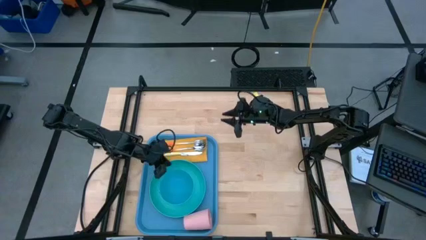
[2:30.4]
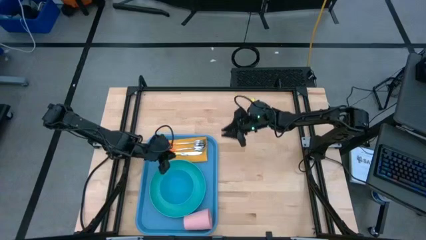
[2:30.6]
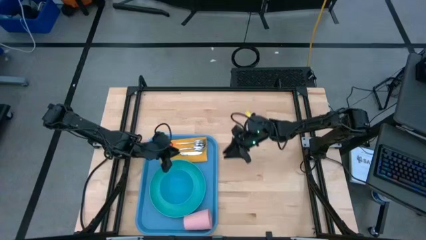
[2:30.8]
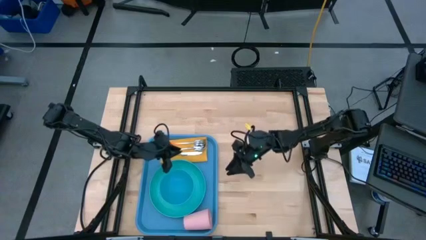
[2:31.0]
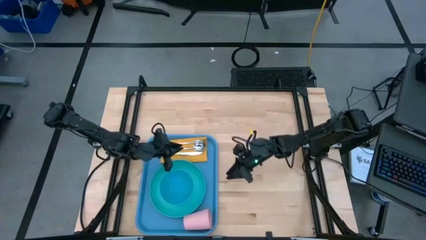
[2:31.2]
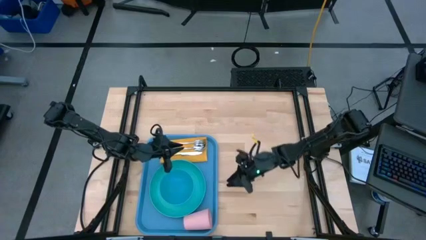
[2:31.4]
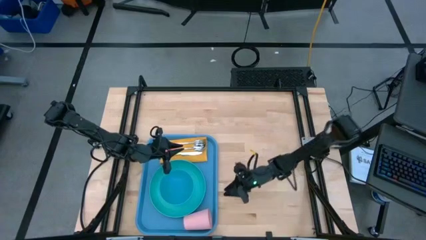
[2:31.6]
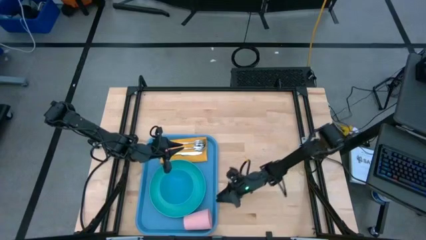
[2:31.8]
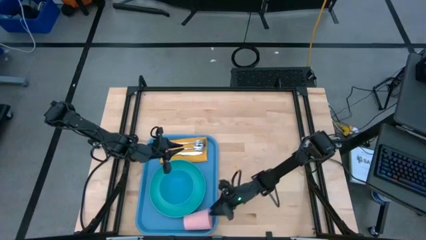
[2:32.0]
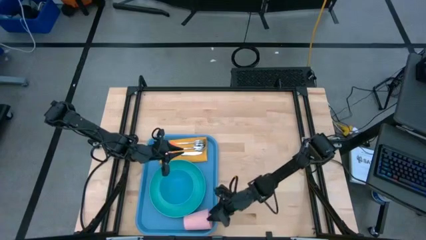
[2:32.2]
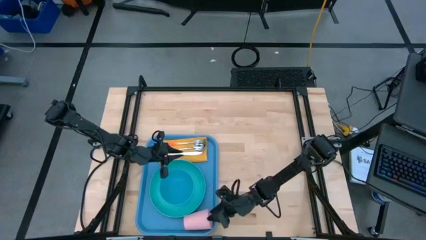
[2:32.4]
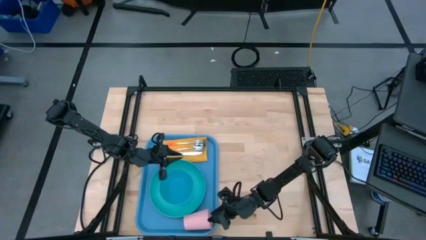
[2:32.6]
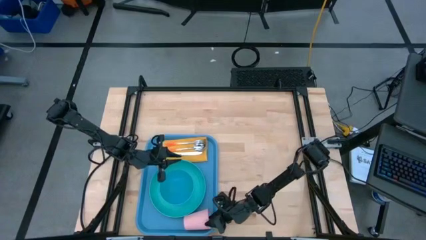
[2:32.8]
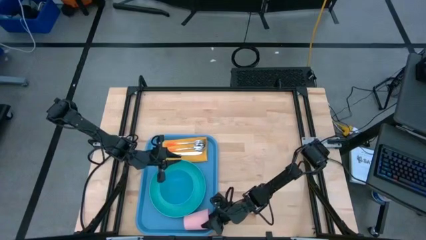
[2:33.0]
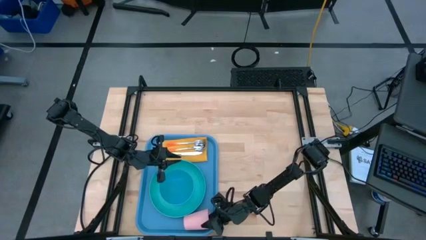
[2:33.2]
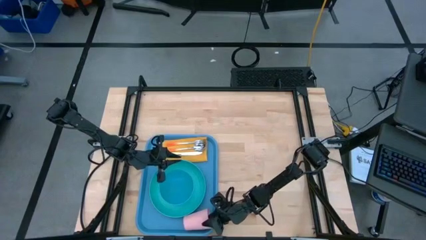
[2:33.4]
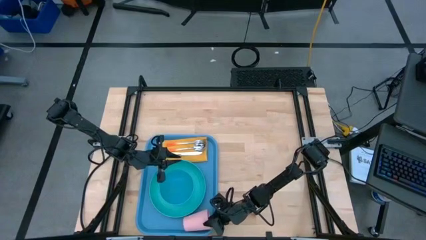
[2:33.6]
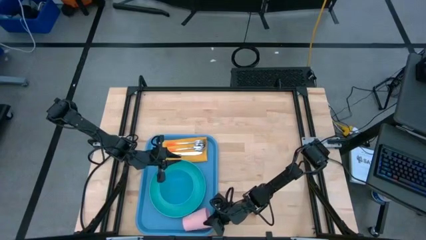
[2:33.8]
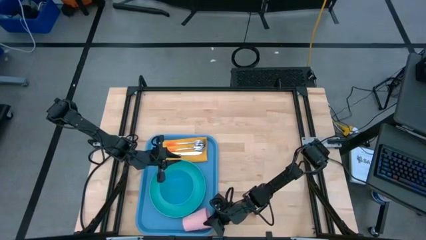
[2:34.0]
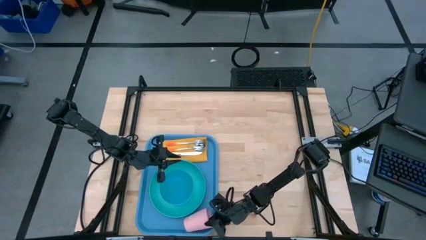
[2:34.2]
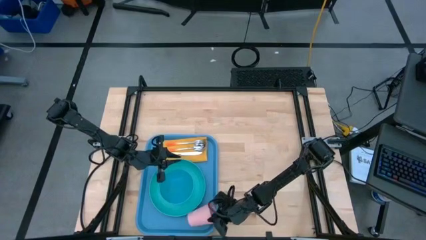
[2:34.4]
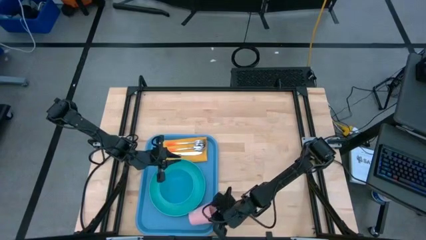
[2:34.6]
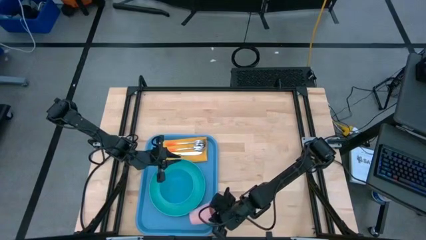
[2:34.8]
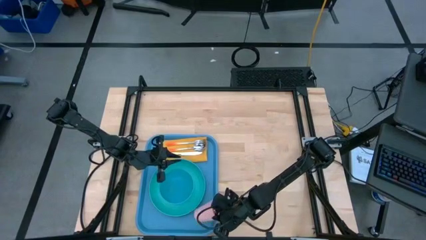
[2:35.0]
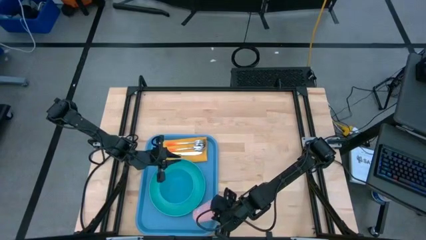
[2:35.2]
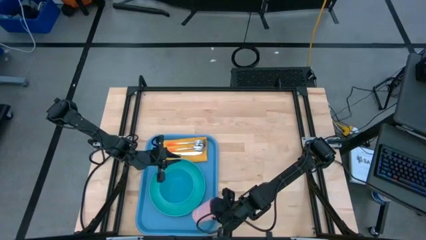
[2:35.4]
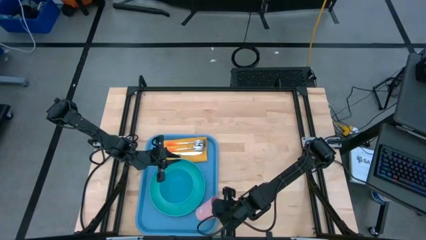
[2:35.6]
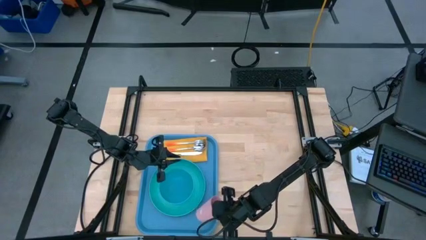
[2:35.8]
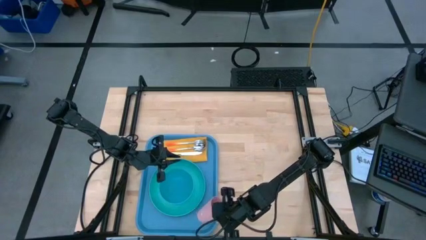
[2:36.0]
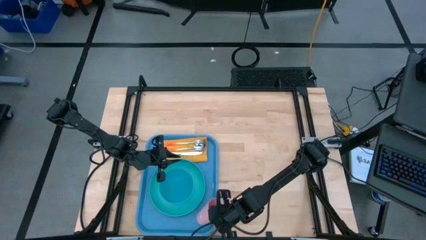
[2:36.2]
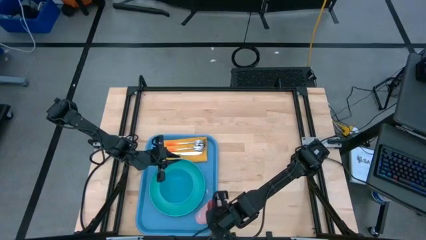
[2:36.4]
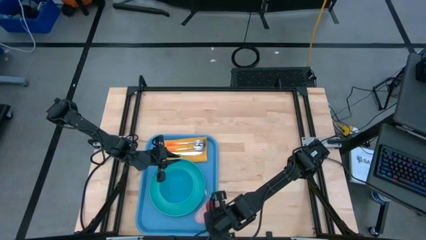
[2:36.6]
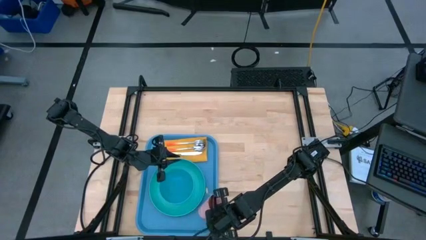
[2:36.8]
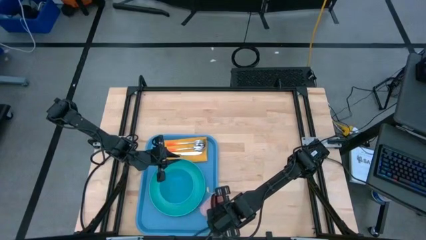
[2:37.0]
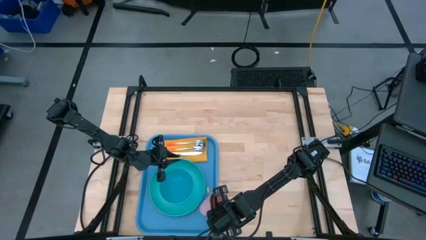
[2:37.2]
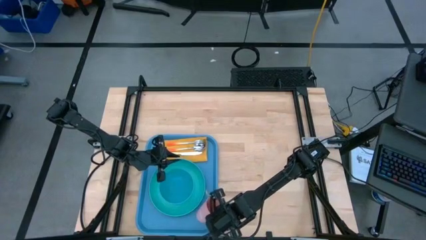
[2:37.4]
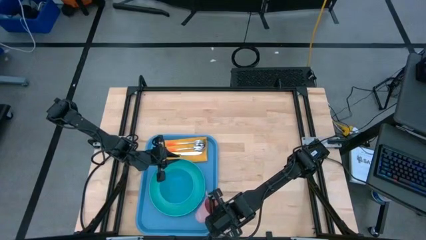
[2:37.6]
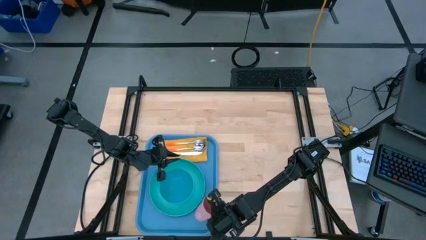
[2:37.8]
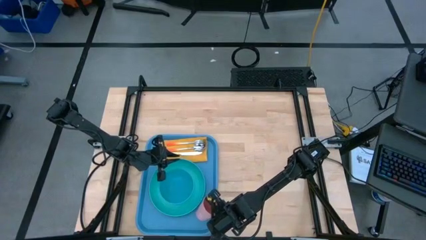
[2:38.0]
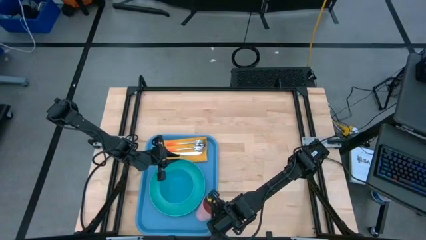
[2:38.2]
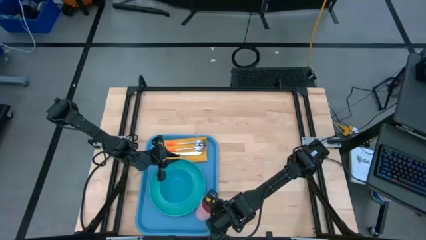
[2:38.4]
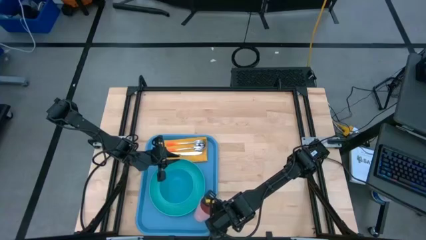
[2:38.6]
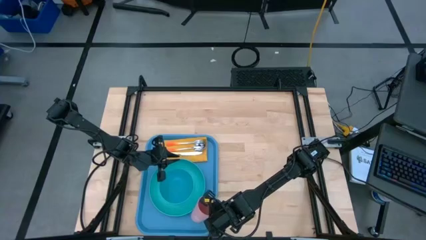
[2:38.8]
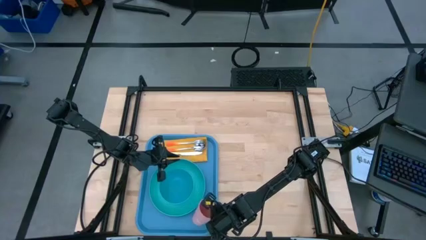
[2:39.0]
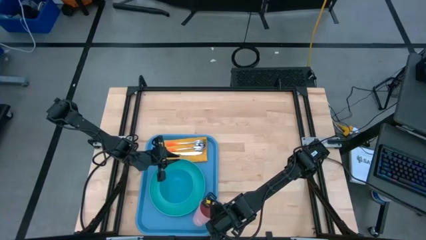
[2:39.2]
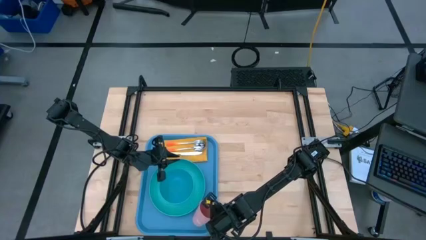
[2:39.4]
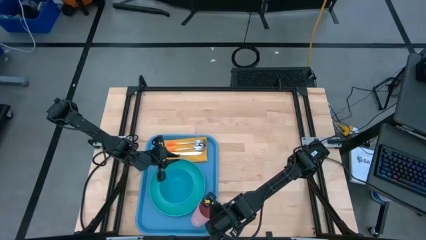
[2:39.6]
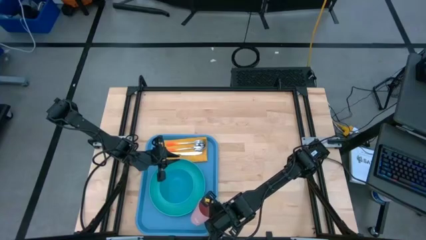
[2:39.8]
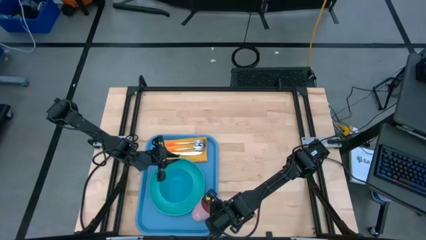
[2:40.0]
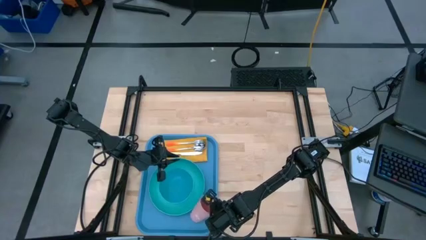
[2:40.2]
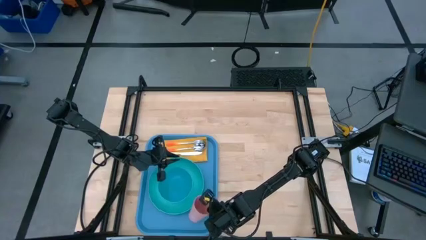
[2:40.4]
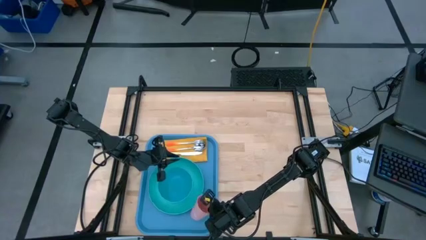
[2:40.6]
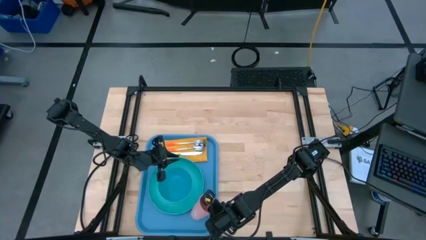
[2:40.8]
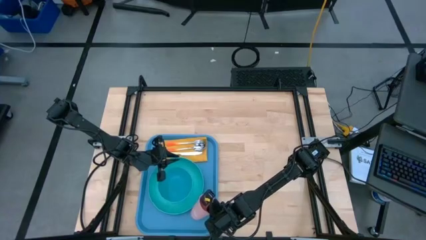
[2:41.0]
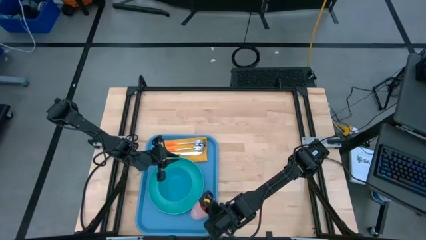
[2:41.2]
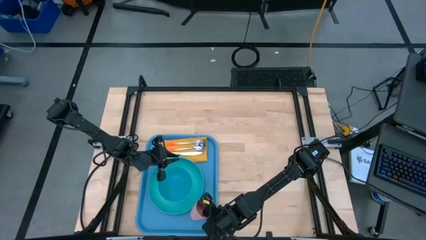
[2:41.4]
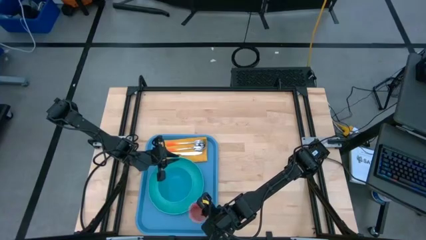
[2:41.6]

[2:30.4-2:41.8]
Task: Set up tray
Adjust the pink cup on the blue serving tray
